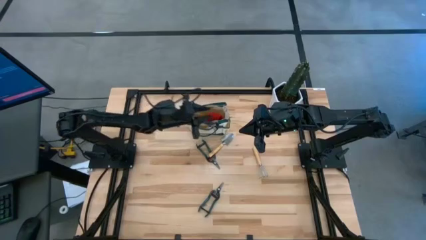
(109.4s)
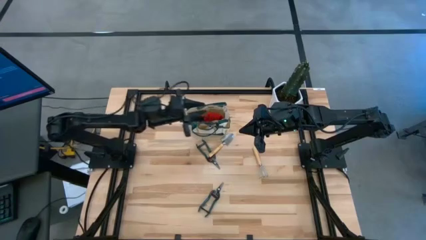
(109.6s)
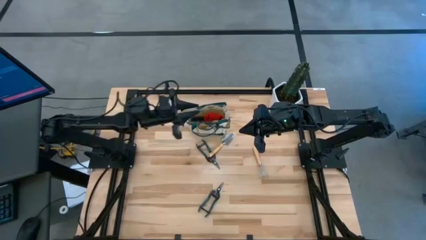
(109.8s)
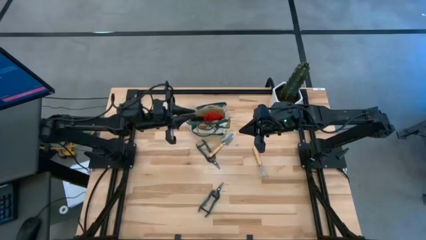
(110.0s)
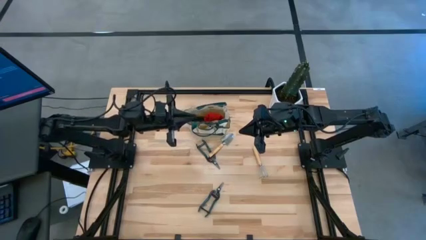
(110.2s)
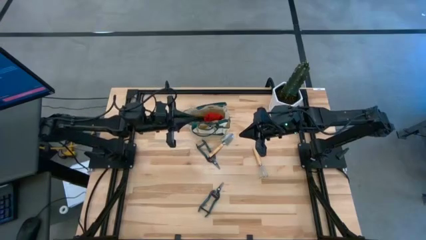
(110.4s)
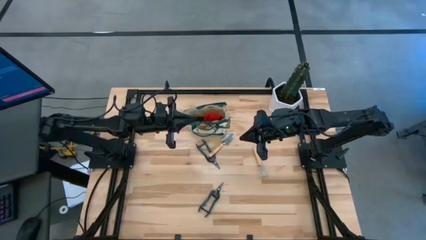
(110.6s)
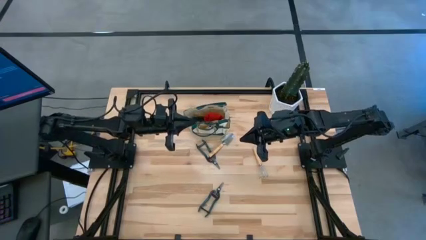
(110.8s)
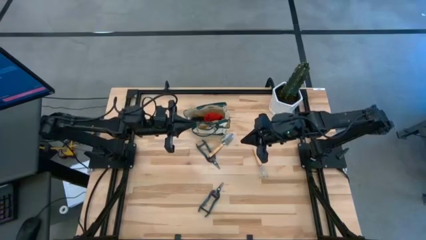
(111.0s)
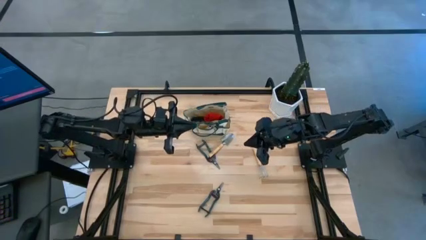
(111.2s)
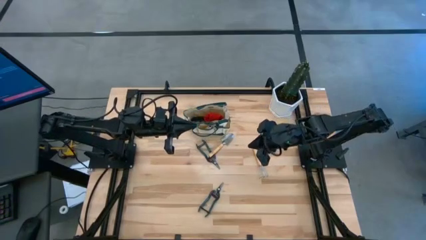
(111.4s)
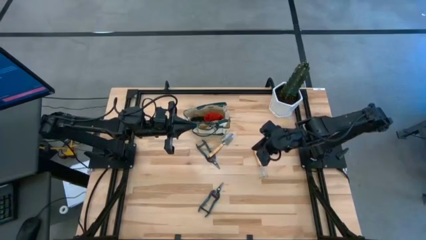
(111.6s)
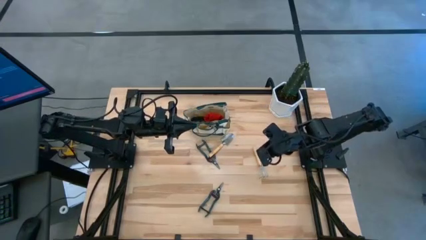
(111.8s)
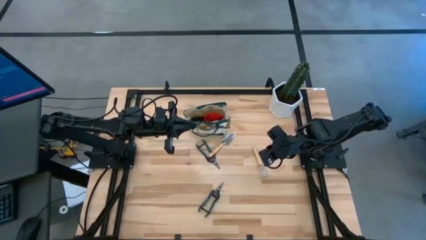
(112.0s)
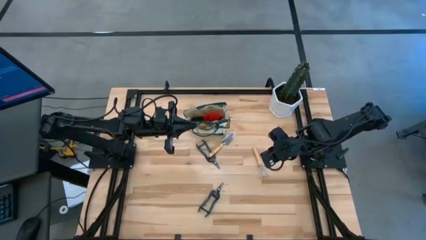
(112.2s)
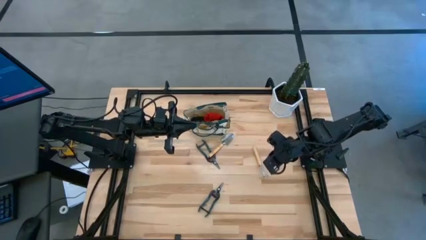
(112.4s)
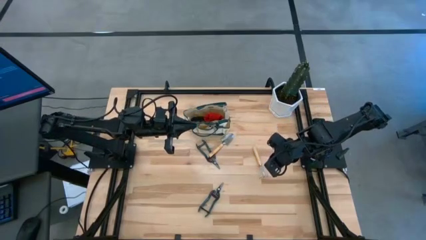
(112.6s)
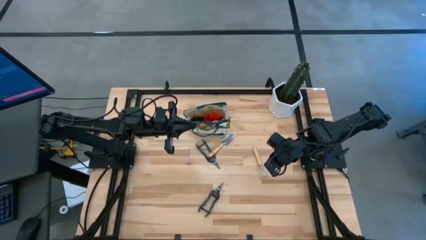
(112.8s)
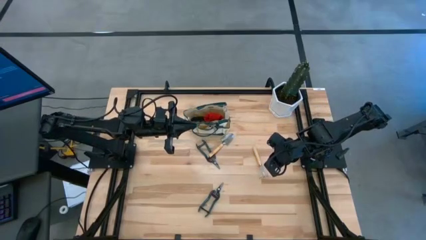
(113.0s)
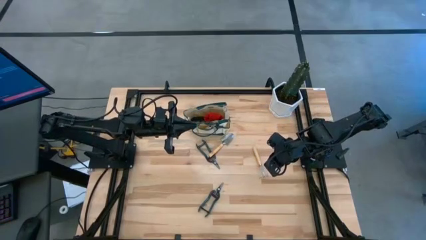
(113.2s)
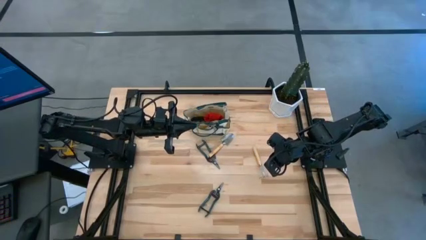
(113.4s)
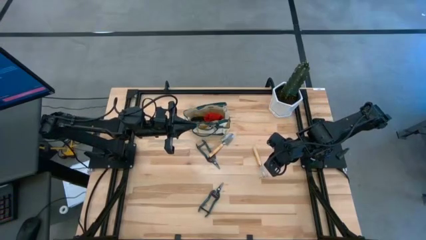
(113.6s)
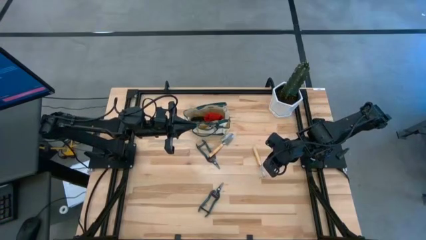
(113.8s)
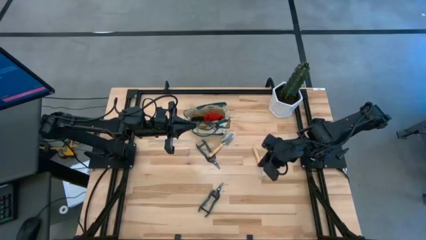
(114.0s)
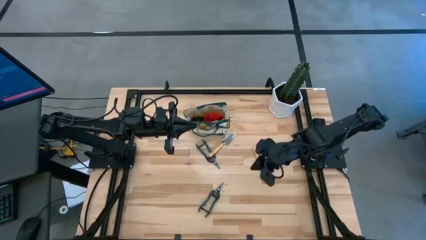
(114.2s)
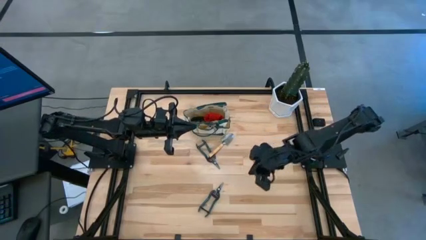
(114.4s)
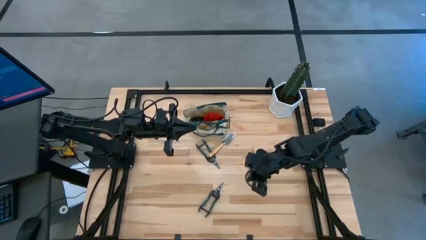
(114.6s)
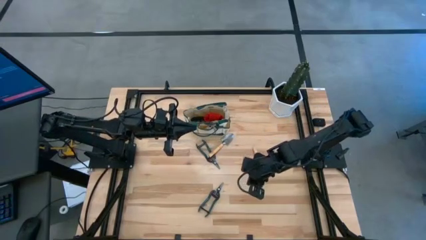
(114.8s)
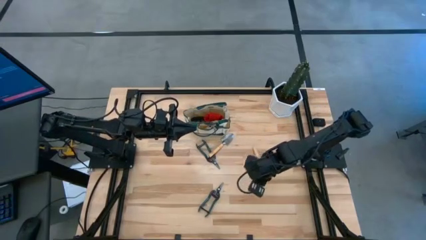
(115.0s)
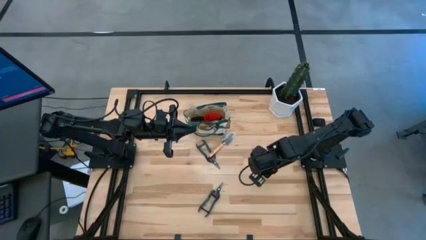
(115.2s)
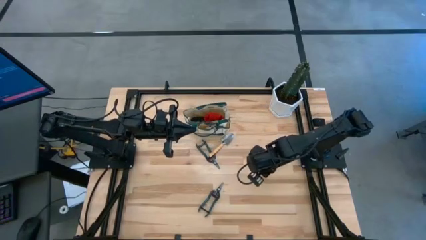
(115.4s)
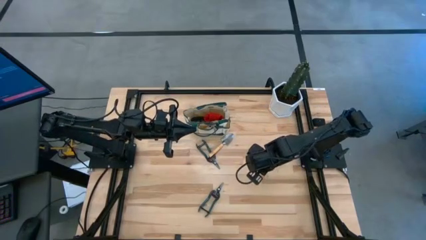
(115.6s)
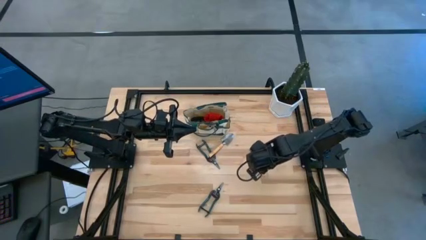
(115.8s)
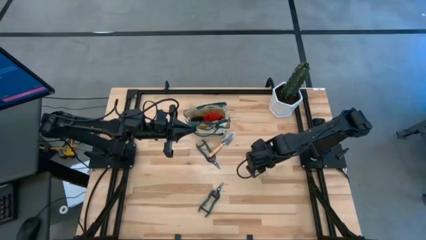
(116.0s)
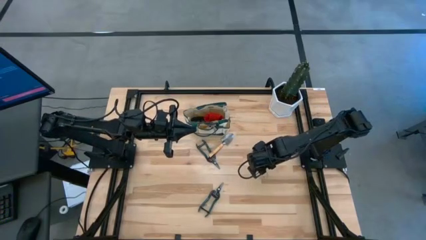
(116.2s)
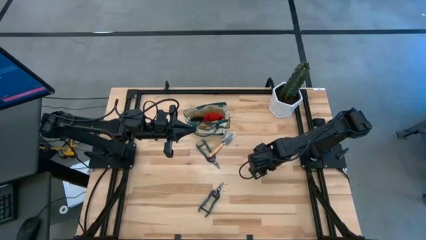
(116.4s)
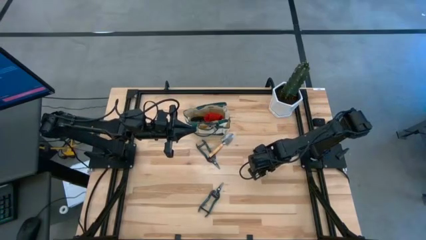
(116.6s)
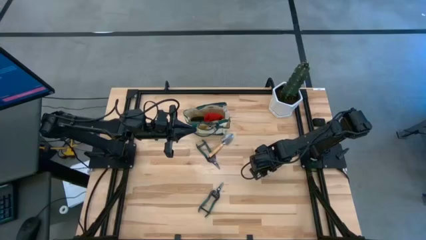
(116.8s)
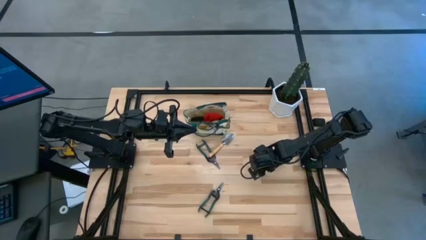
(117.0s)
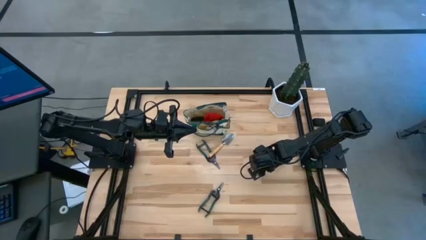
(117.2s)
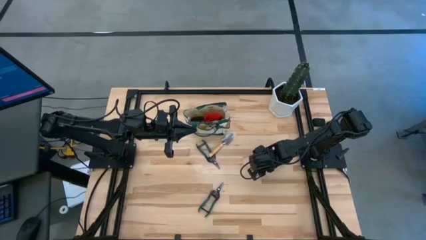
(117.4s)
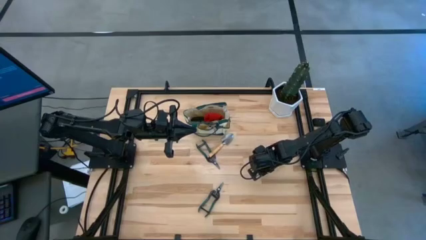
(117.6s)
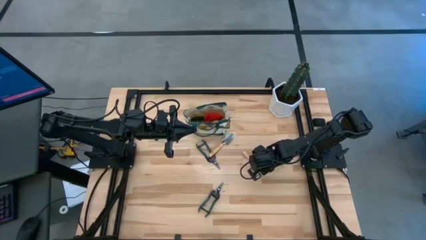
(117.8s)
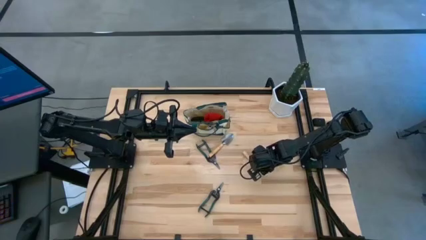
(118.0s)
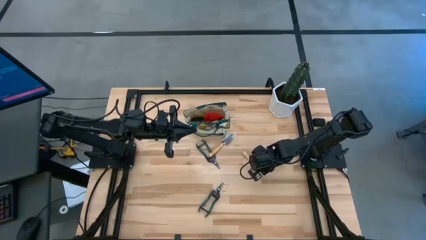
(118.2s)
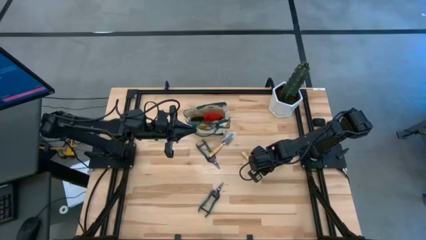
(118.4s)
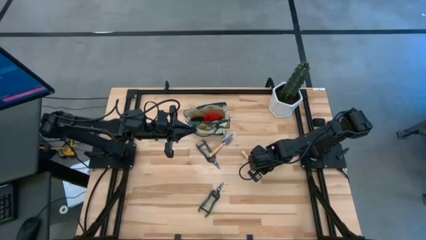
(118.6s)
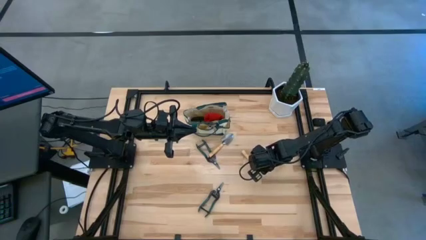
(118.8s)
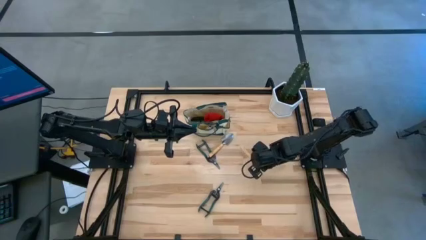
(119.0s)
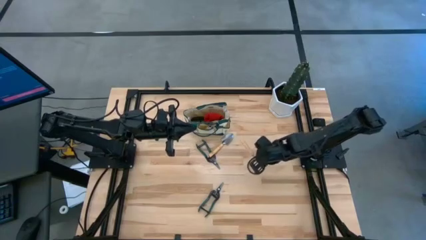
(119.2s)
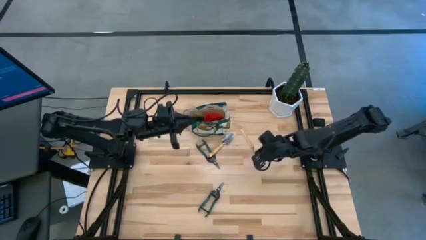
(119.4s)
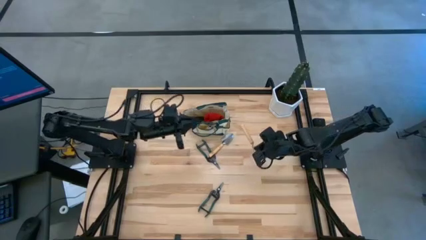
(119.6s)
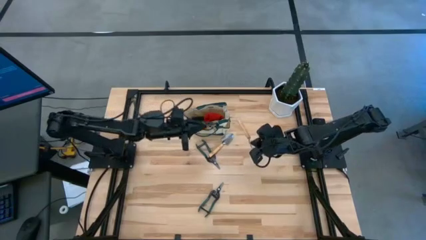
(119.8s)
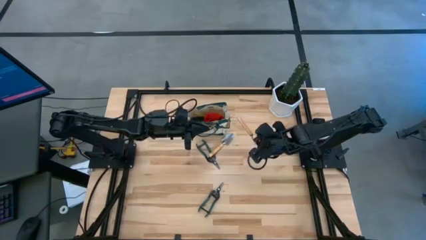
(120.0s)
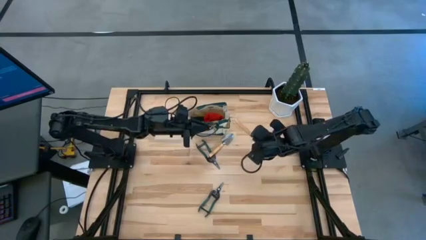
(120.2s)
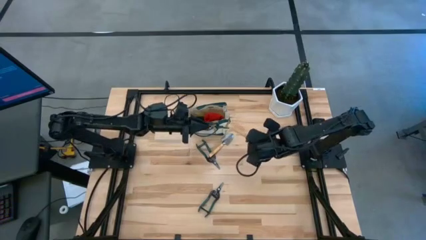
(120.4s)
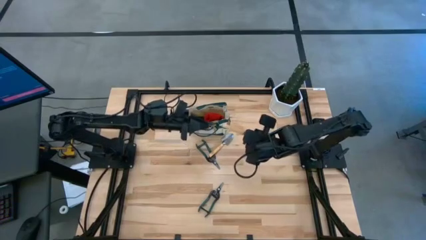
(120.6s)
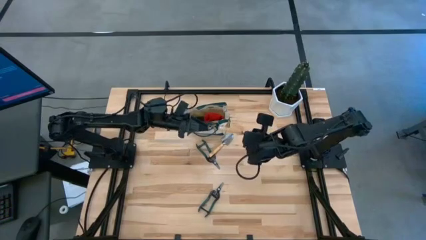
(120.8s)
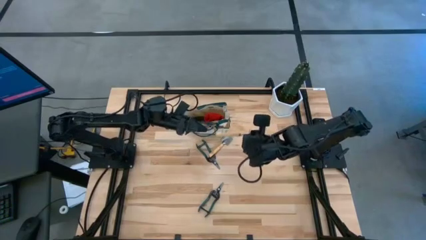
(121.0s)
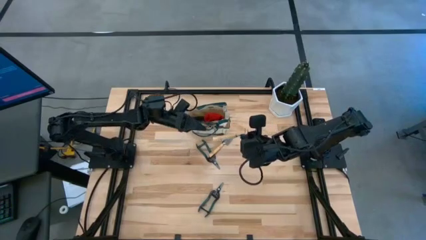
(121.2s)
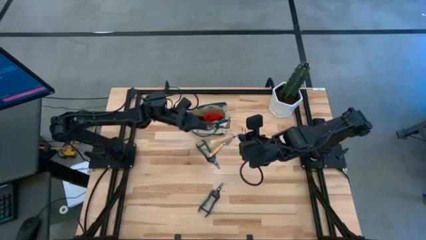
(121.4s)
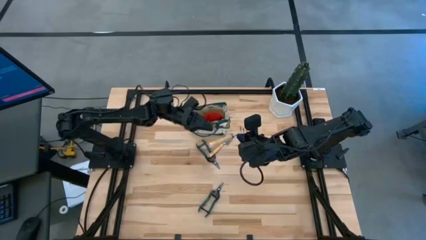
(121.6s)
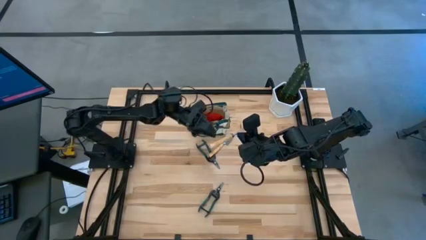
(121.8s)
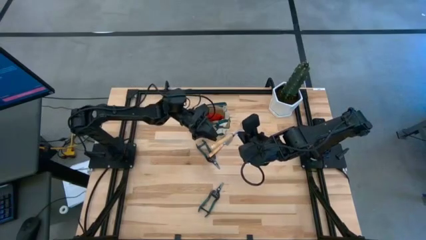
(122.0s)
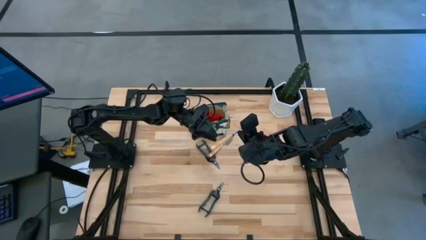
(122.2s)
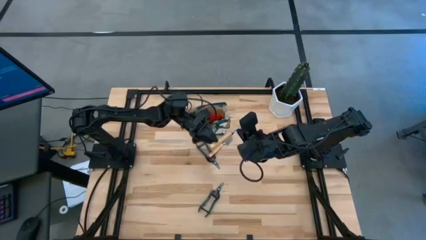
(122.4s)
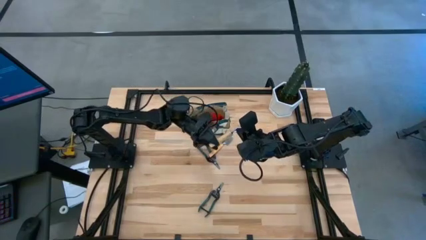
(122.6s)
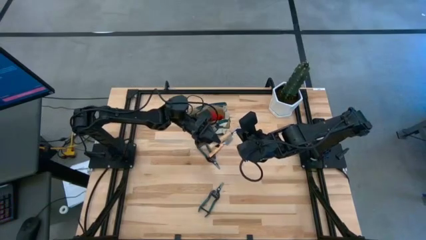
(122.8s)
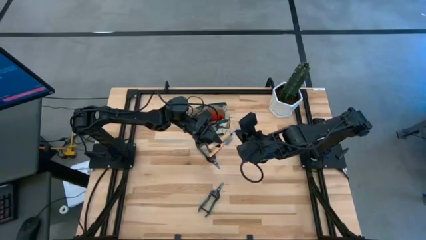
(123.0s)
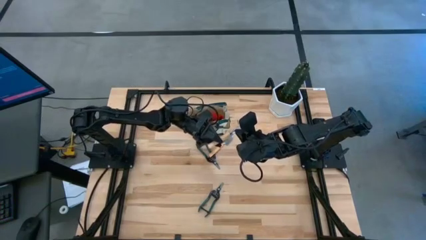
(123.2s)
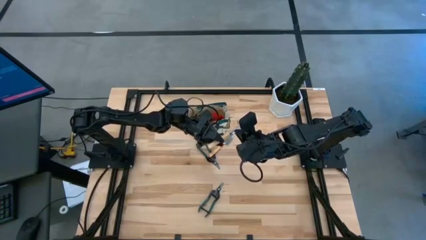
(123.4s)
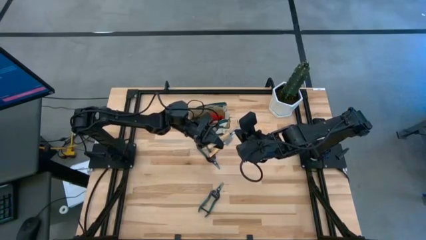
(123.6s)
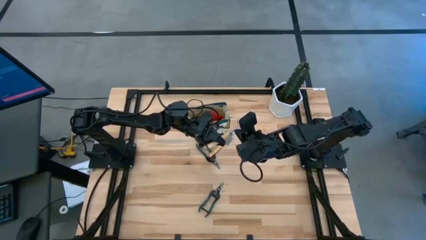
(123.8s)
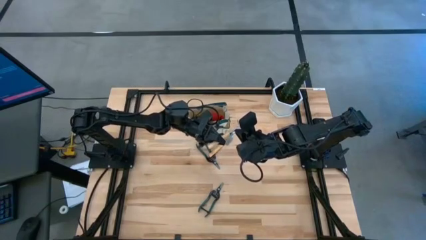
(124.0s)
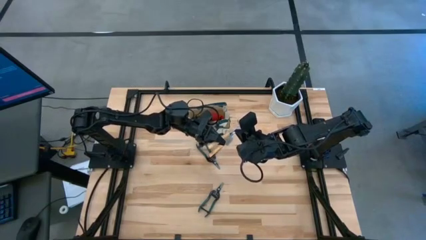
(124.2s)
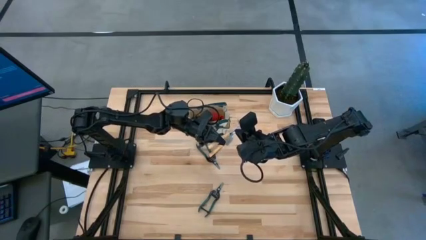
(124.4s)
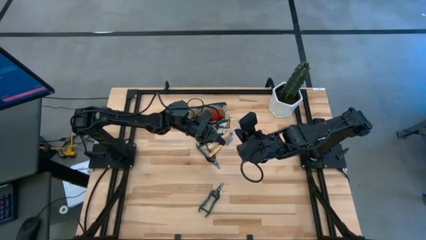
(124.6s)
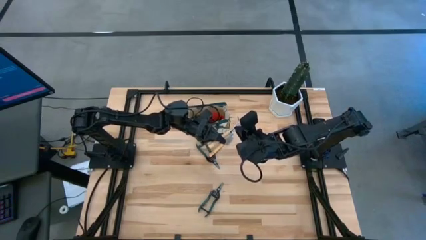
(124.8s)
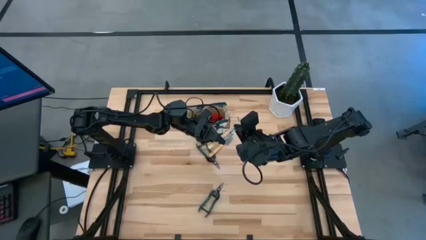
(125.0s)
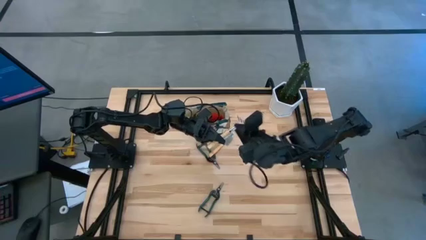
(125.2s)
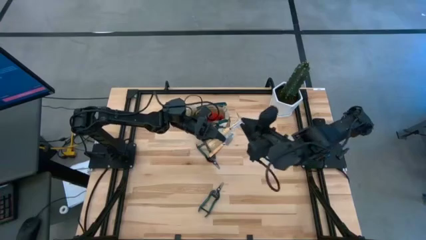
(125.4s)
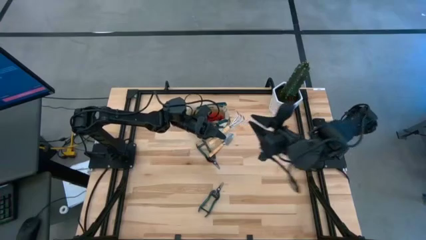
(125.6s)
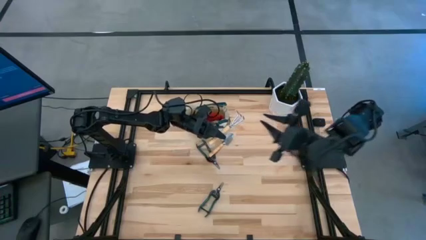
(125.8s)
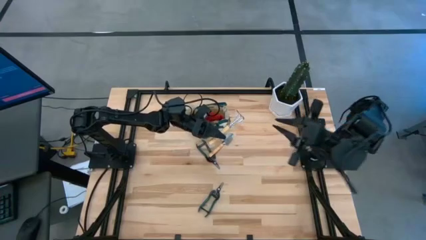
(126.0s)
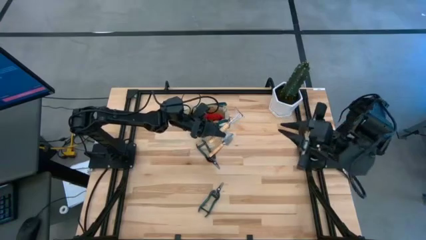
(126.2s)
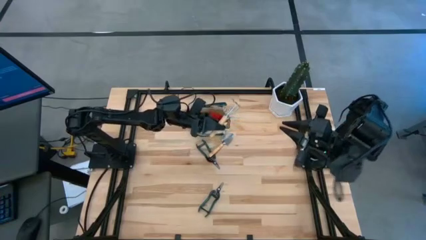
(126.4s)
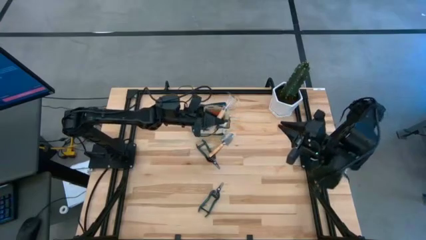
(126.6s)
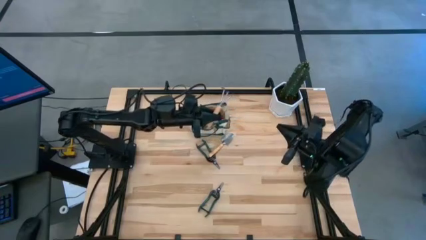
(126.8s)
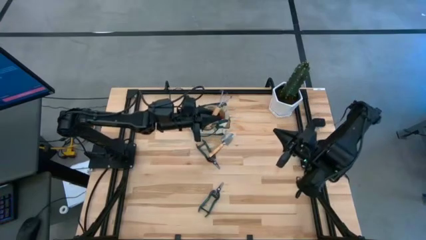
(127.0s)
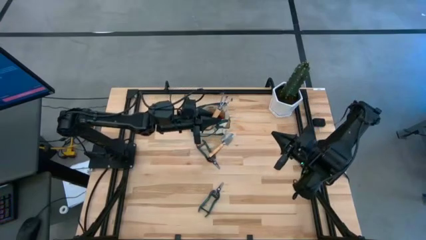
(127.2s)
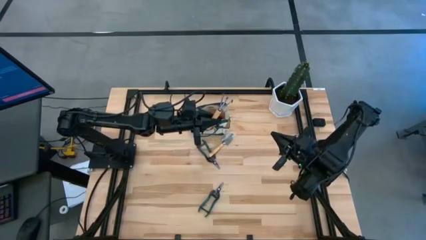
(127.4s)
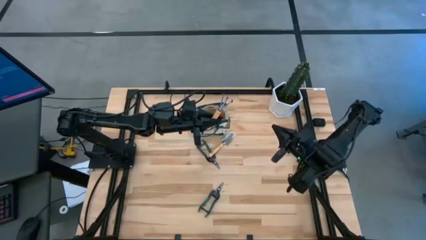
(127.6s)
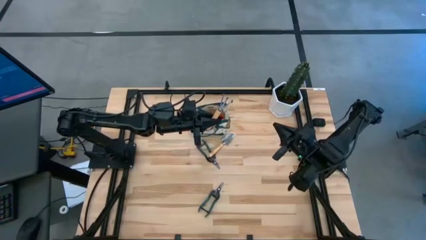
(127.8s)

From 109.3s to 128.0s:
Task: Pick & Place Garden tools in Gardening bag
Put the brown hand rake into the brown gardening bag
